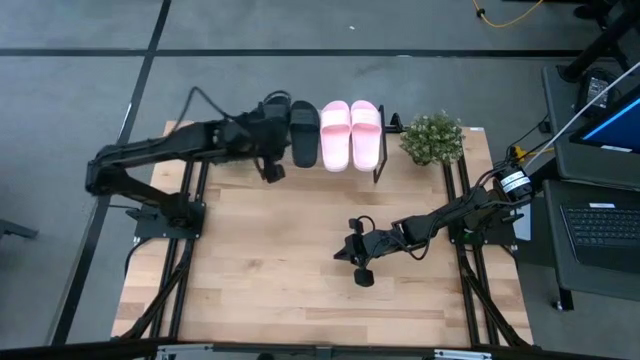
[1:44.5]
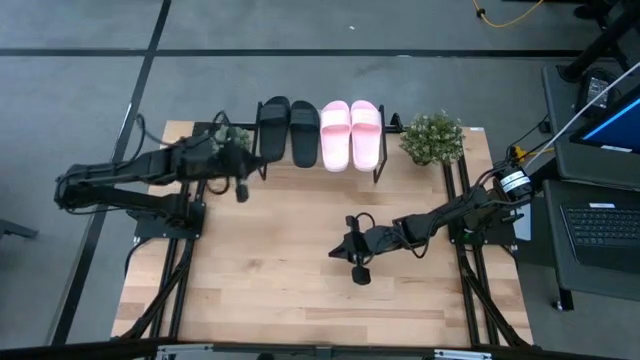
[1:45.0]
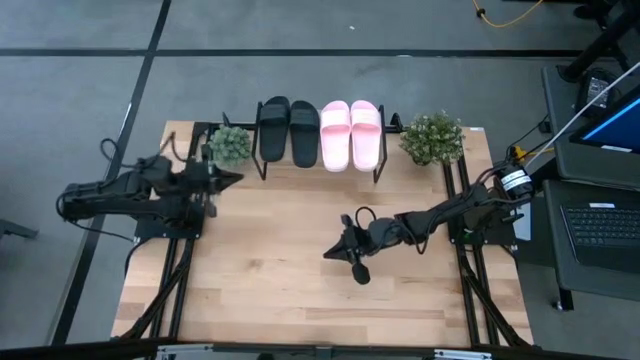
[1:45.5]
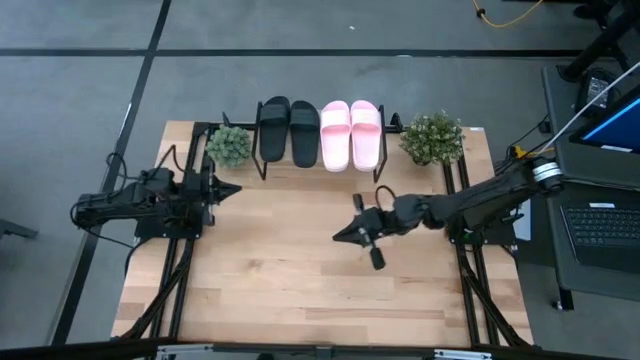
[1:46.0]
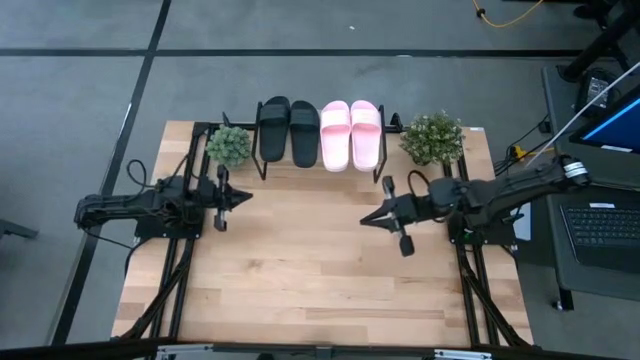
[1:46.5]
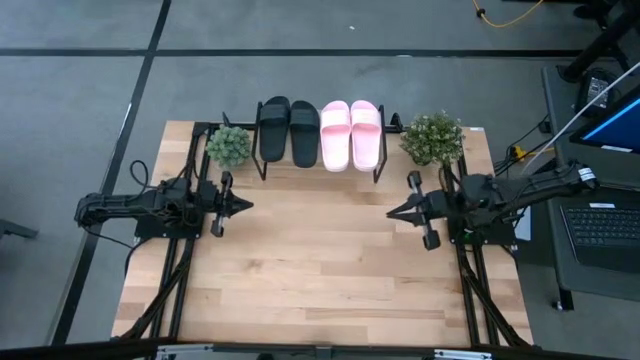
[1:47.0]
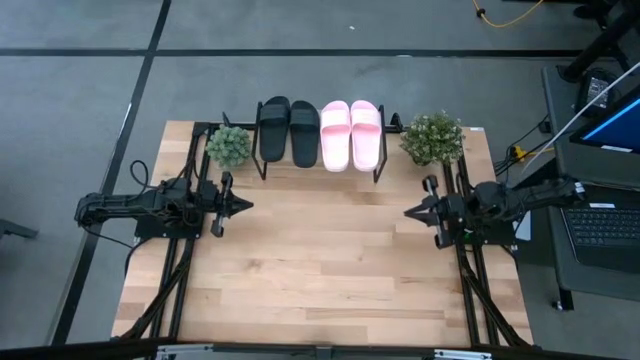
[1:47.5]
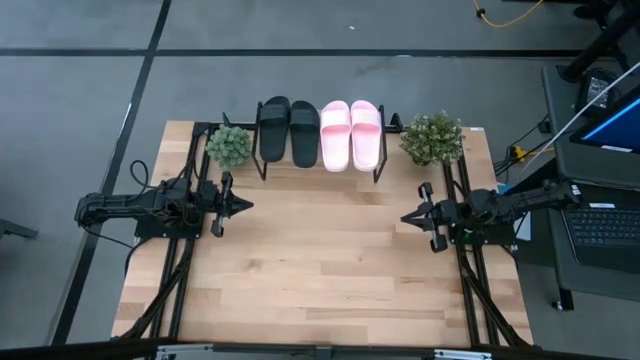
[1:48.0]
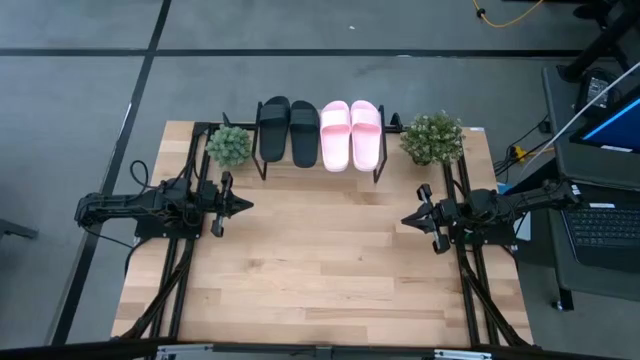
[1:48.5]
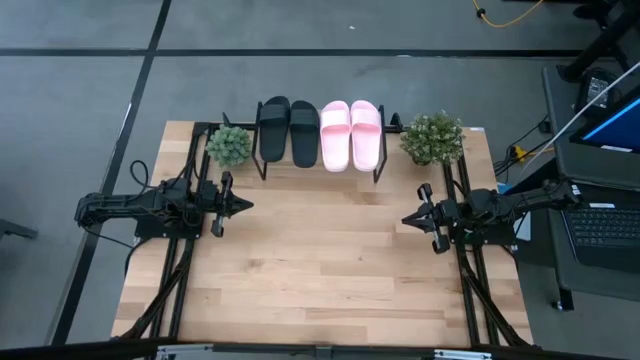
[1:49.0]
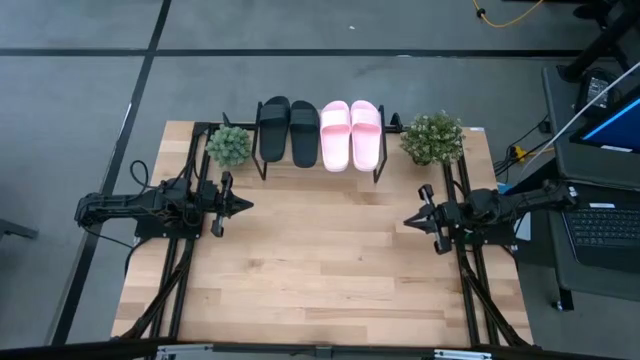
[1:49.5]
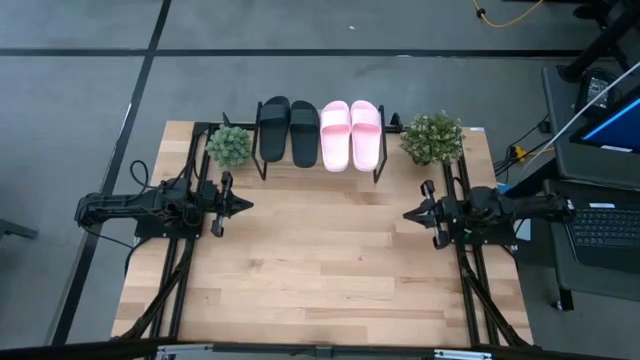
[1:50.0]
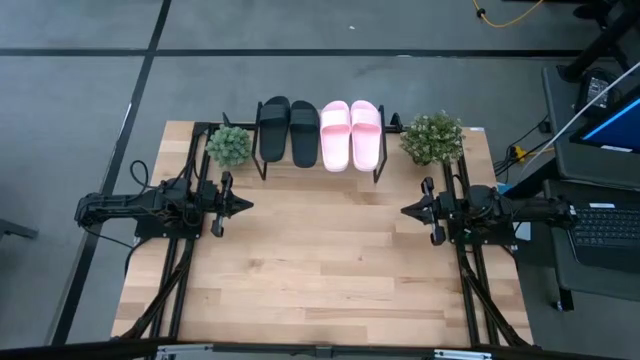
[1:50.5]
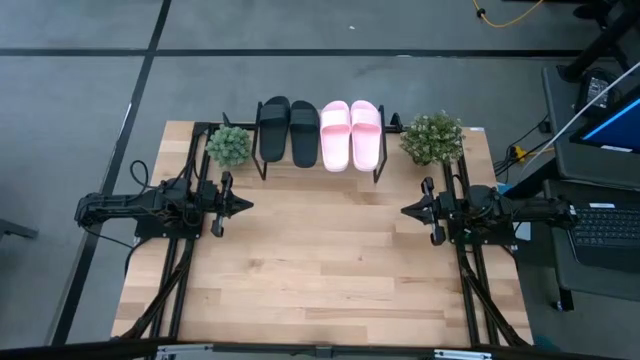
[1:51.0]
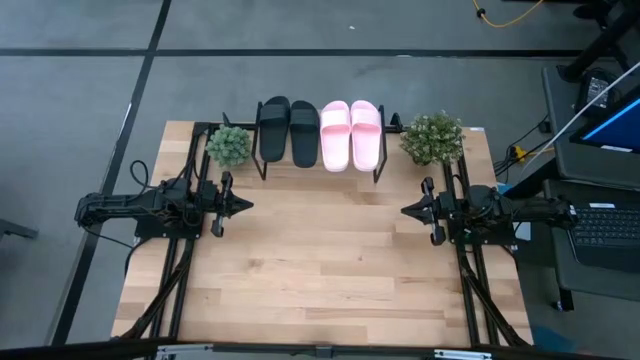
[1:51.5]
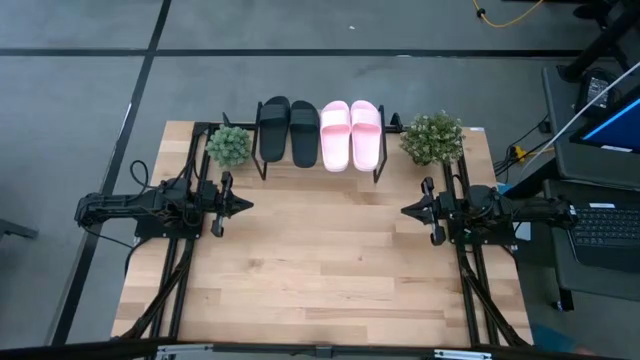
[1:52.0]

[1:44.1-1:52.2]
Task: Pick and place slides into the shelf
Return to Home Position

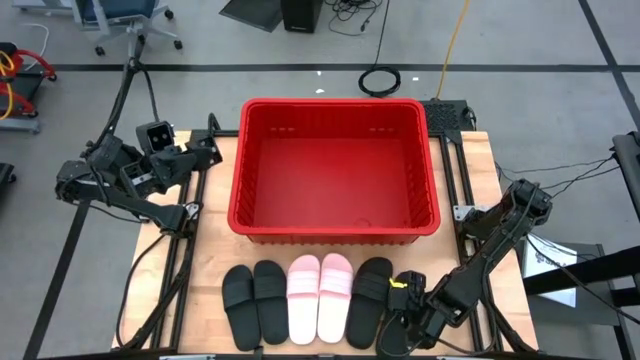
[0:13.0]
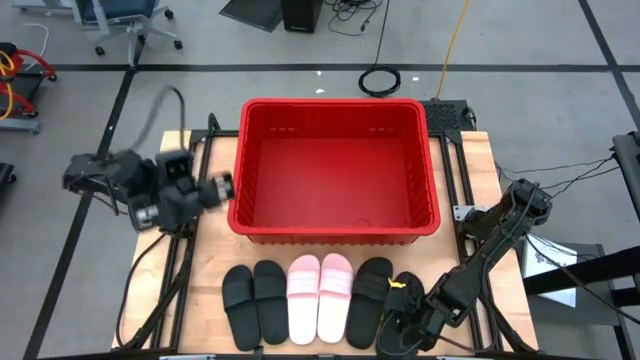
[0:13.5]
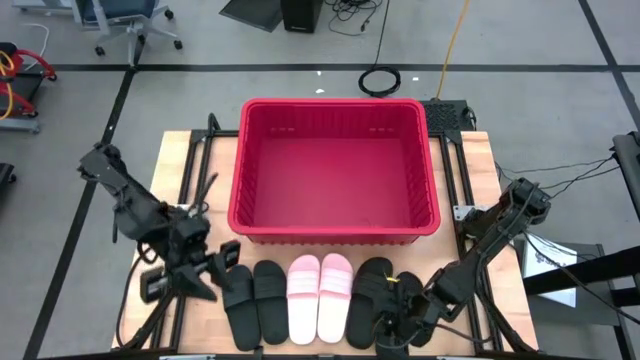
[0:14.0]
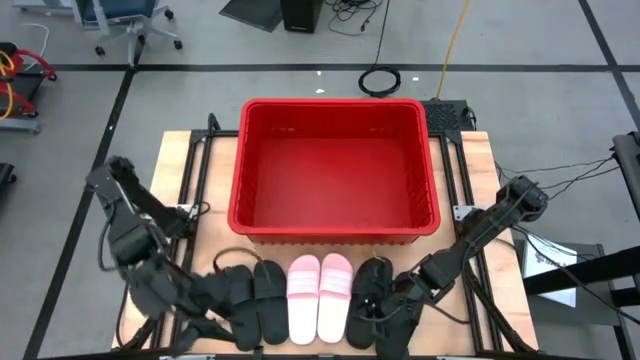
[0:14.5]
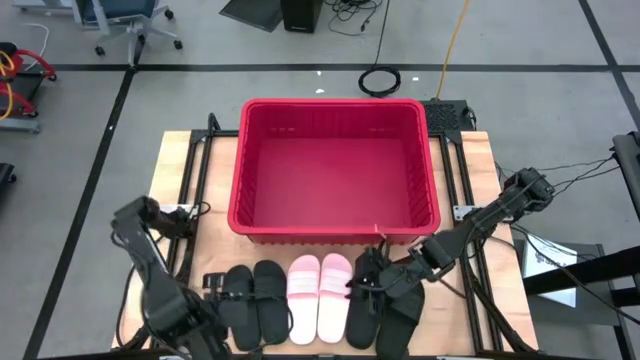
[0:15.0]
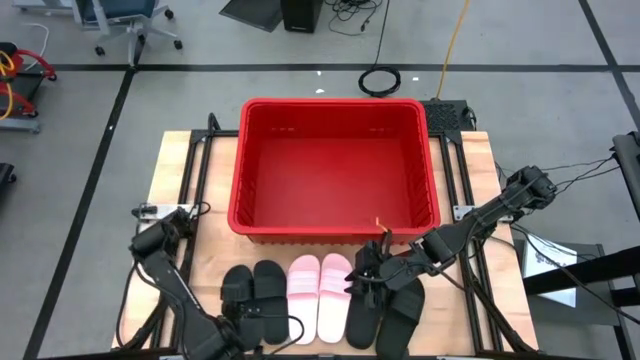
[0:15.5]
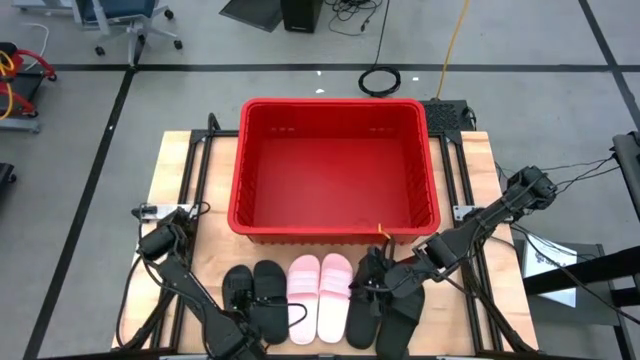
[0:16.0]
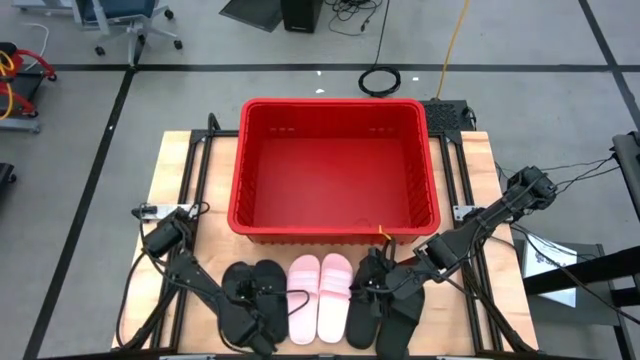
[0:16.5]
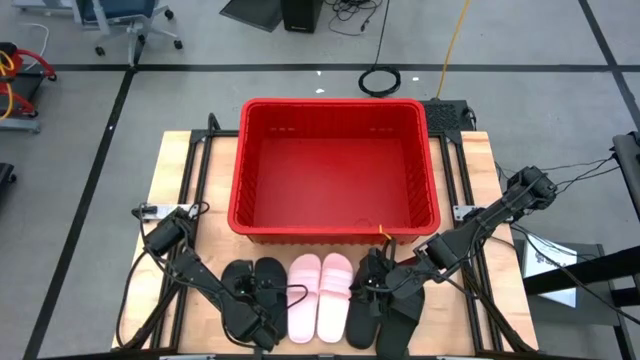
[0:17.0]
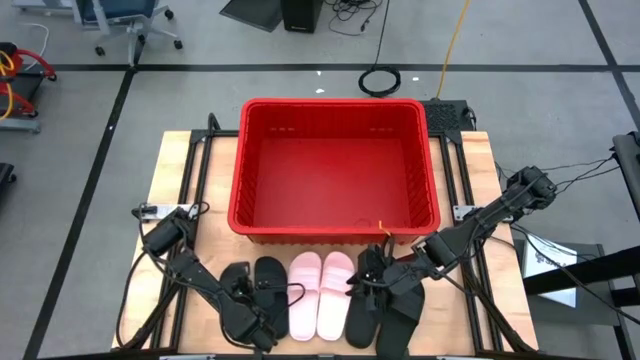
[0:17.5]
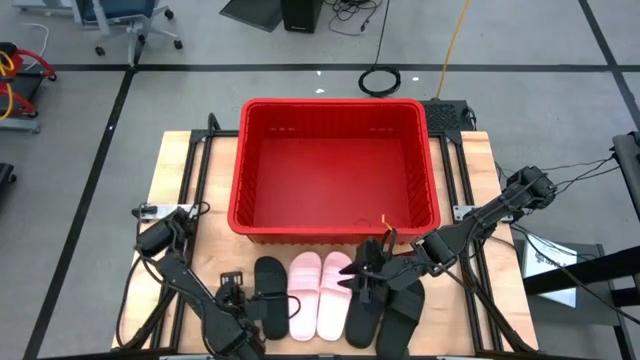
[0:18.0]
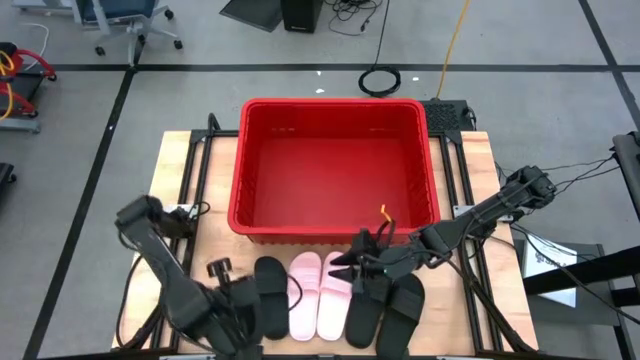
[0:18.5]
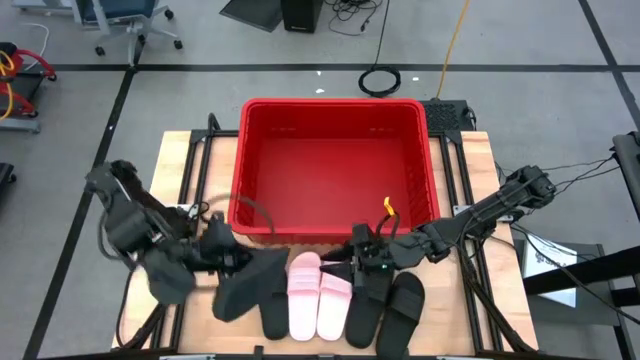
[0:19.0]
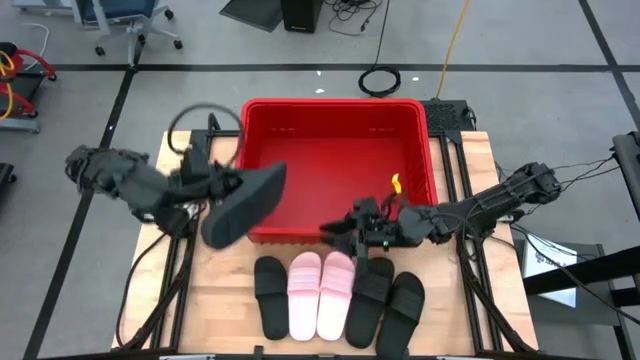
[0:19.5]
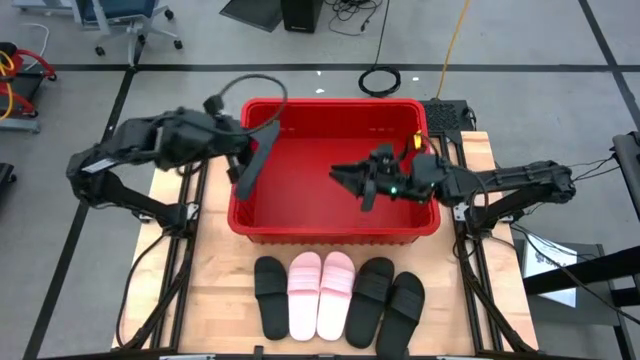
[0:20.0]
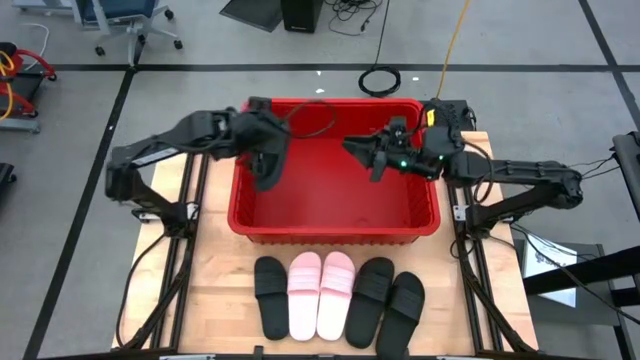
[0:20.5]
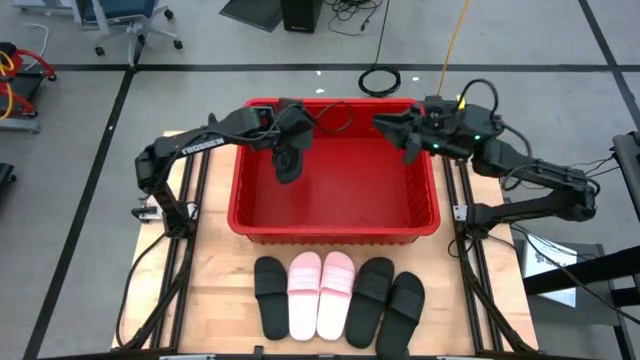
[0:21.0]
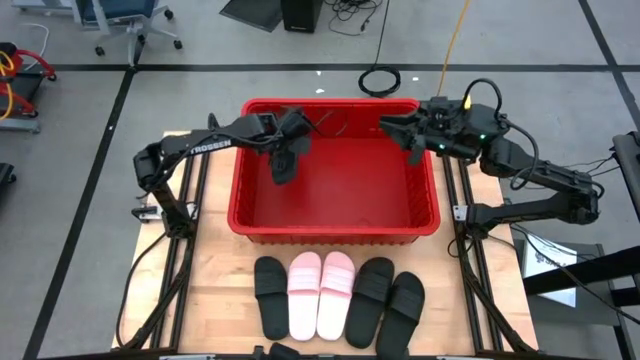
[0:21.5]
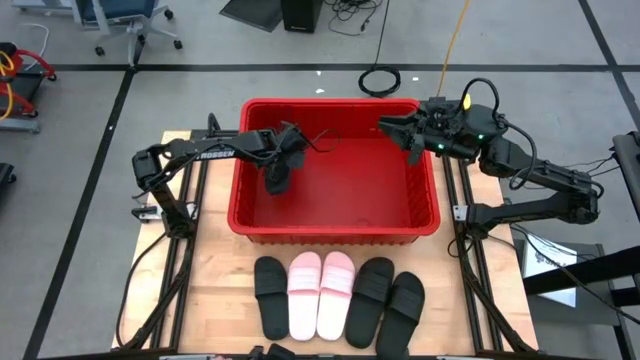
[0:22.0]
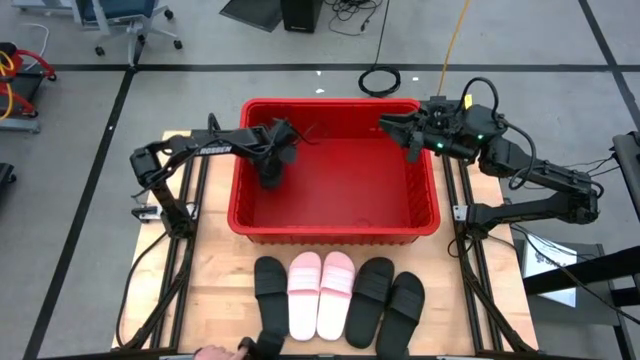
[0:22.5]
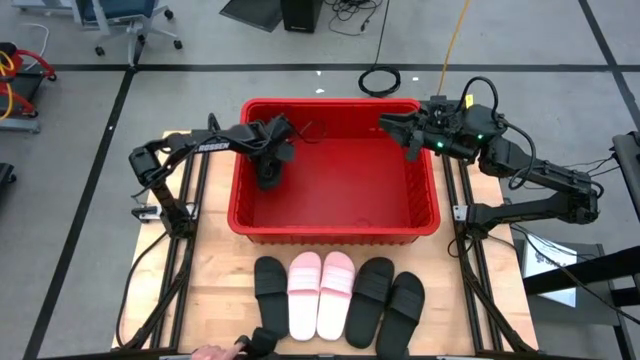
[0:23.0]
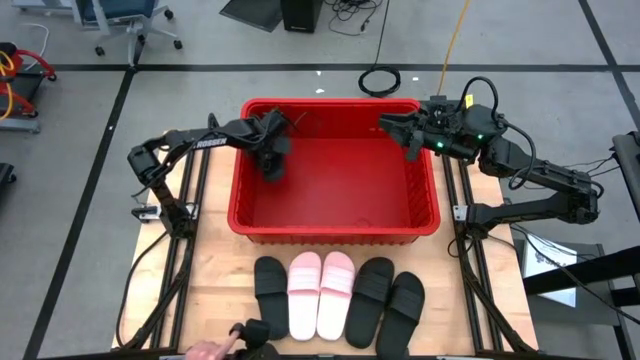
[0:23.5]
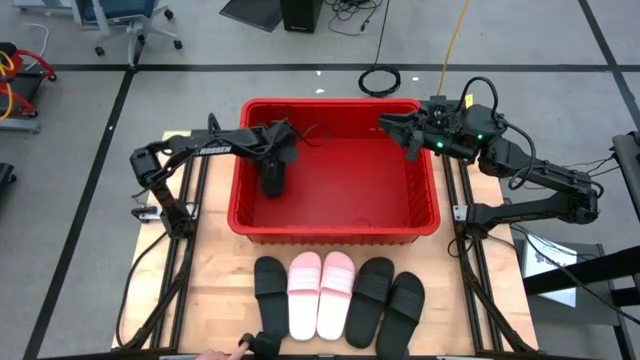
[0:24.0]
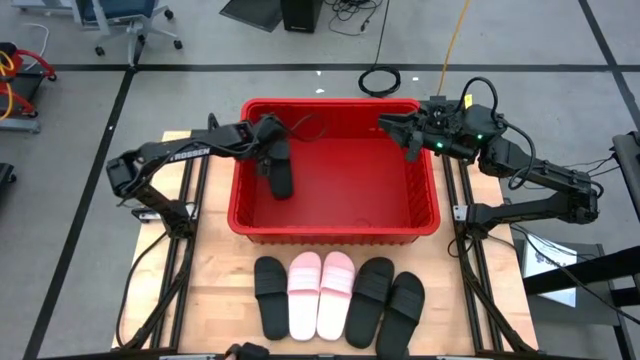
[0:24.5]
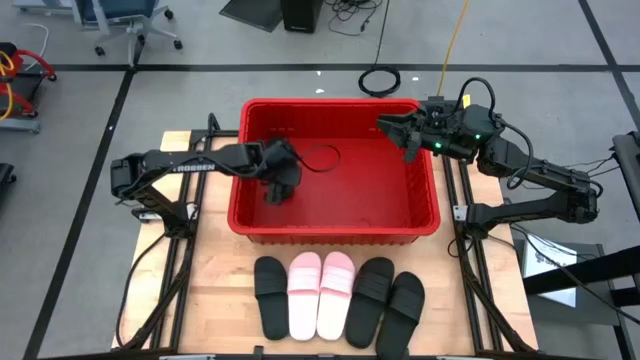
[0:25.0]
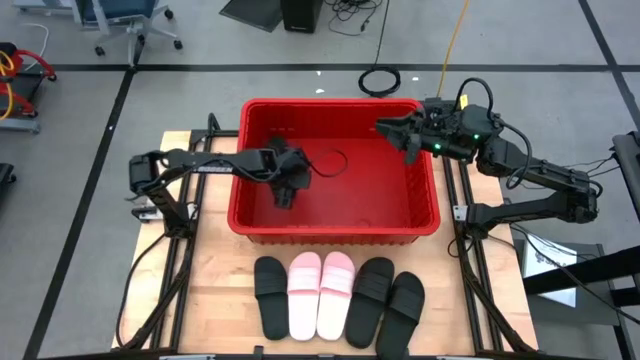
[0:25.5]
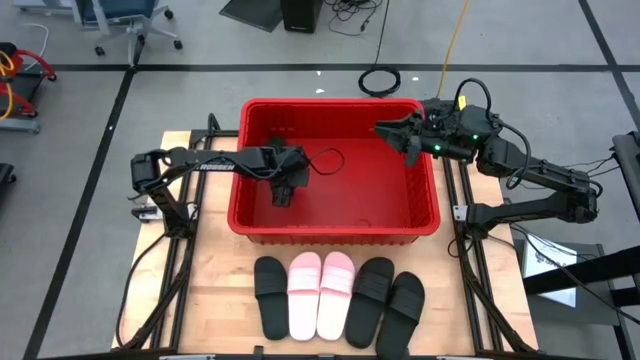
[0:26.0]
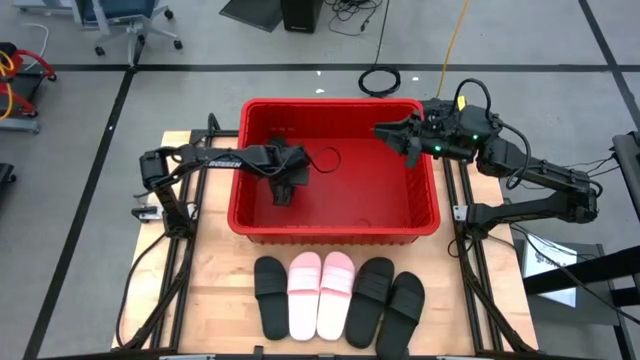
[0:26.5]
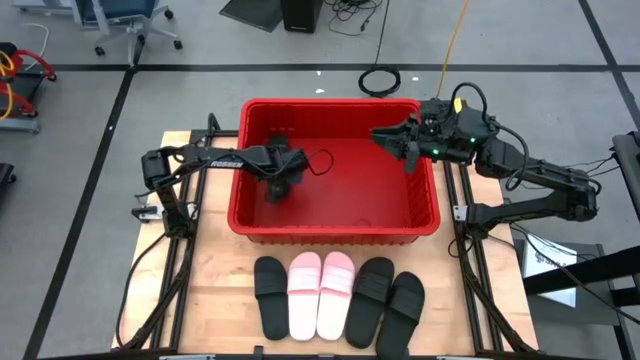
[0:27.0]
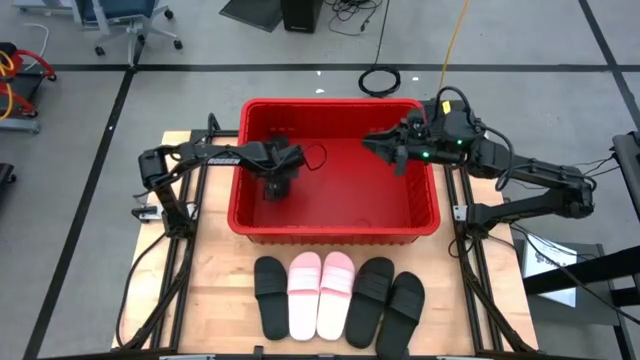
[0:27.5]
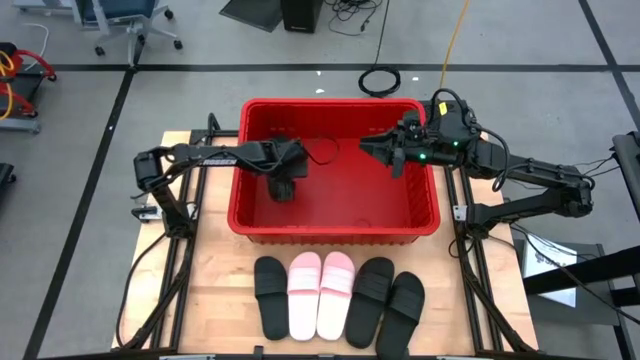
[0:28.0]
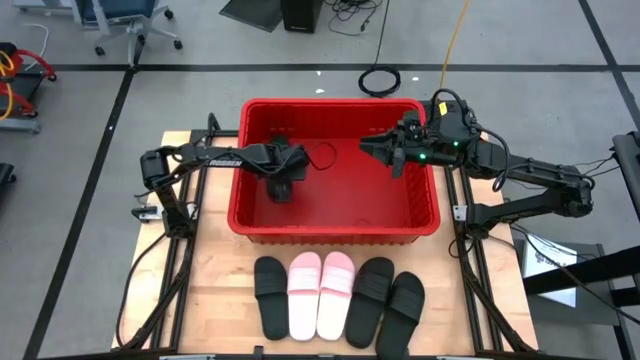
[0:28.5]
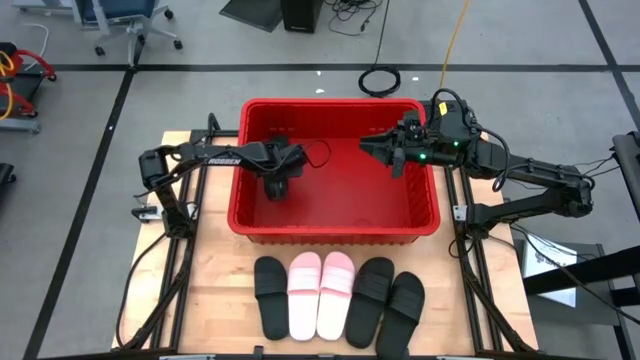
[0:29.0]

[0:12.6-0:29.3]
Task: Pick and place slides into bin
Put the black slide into the red bin
